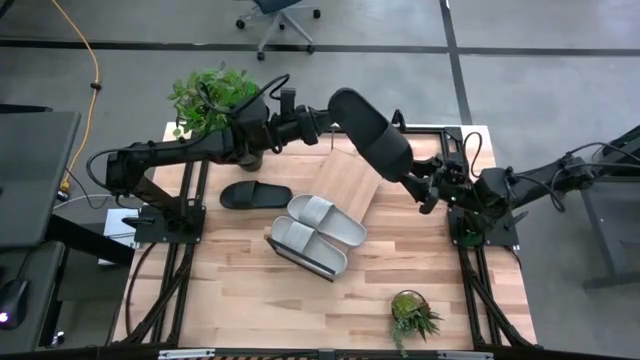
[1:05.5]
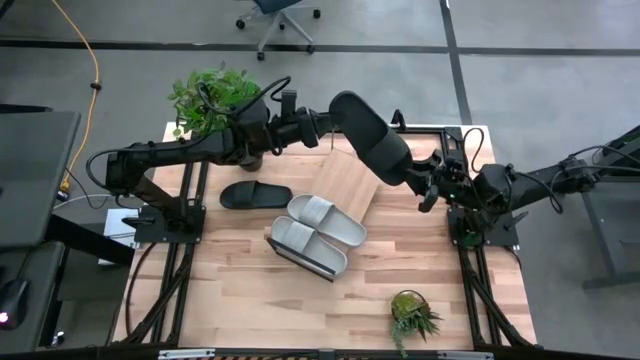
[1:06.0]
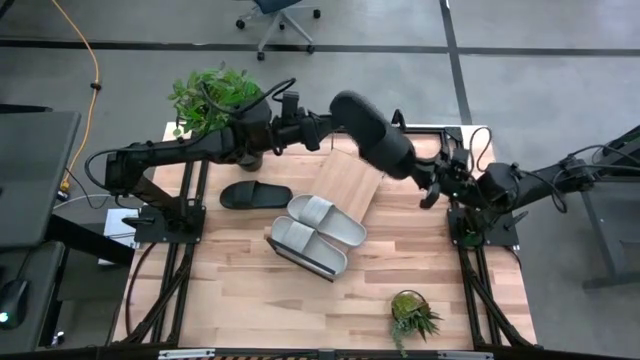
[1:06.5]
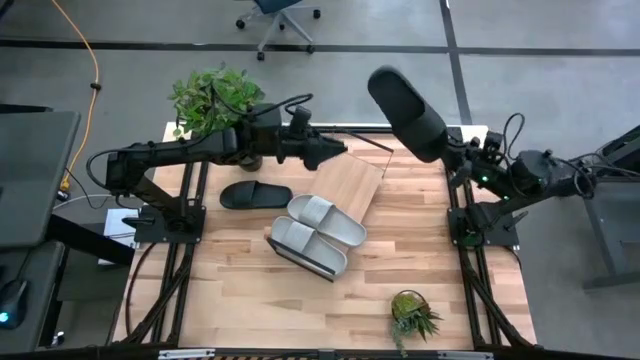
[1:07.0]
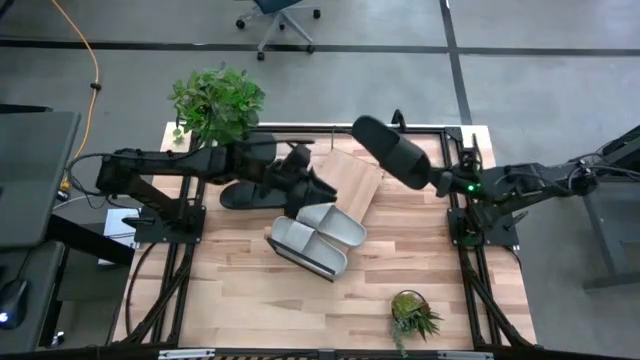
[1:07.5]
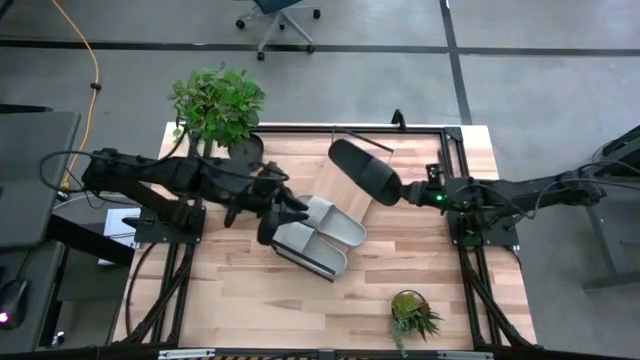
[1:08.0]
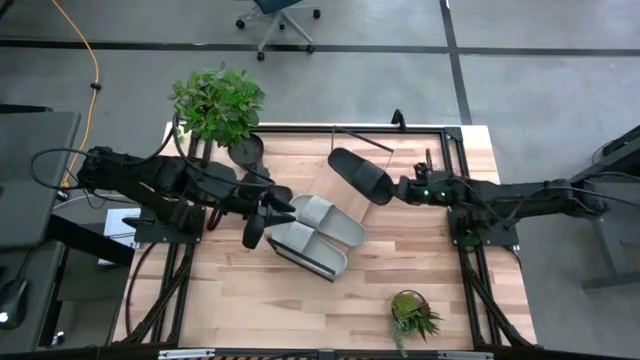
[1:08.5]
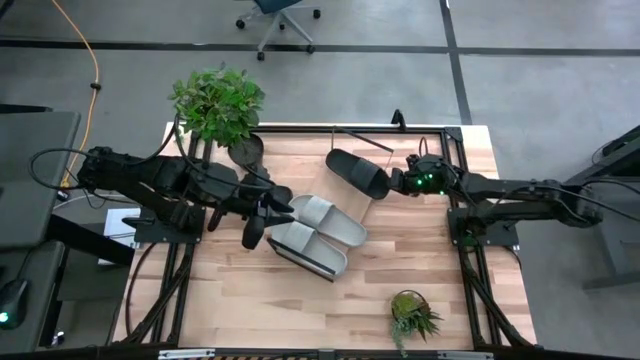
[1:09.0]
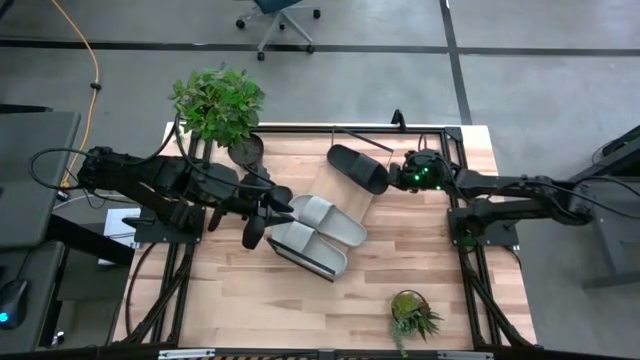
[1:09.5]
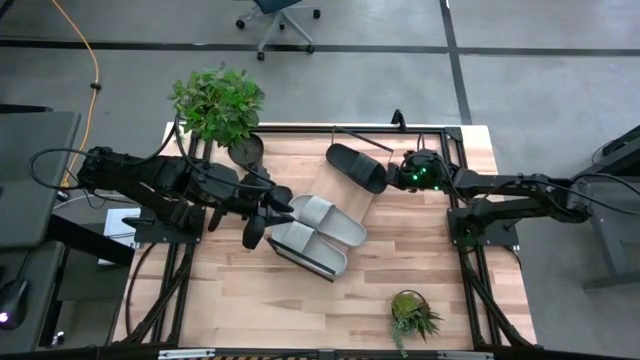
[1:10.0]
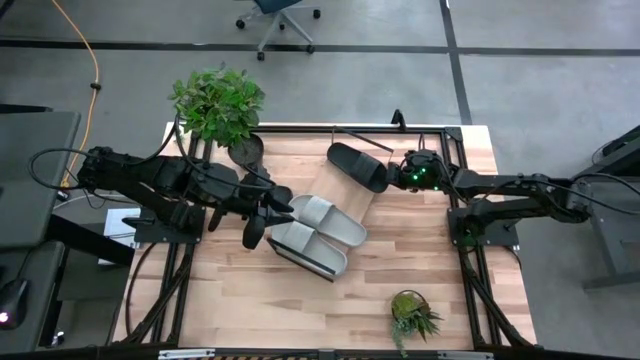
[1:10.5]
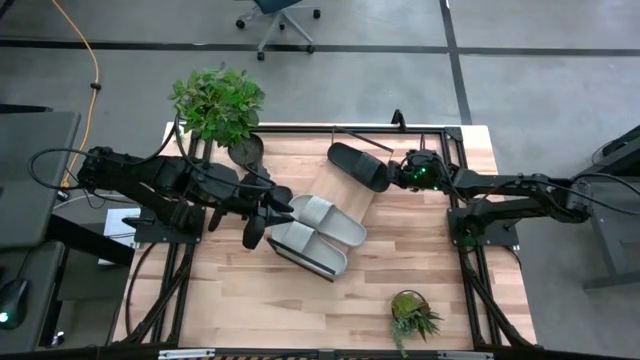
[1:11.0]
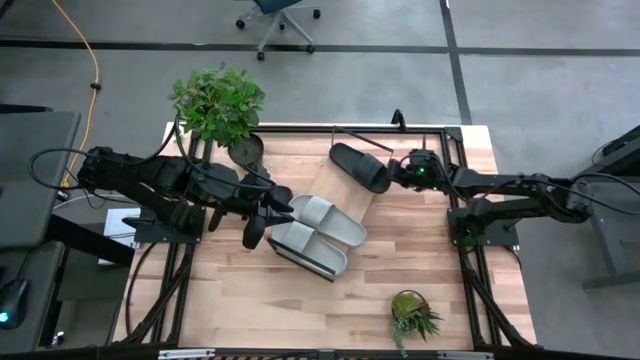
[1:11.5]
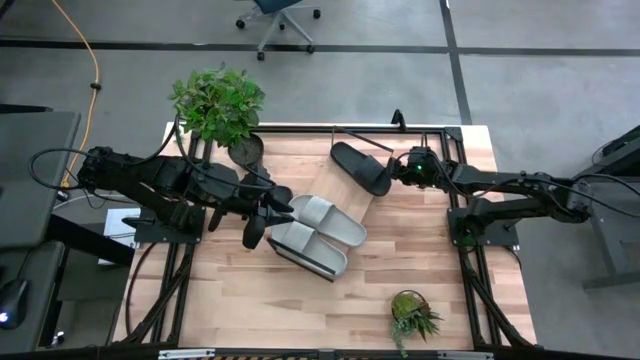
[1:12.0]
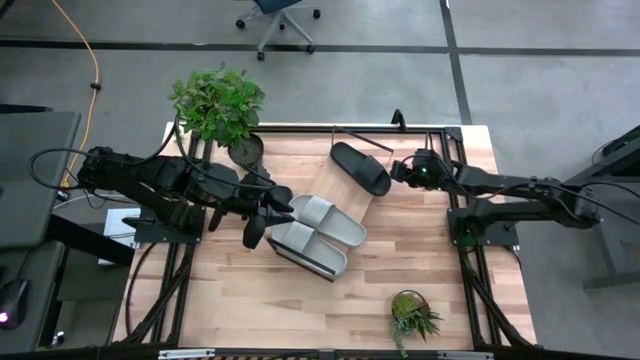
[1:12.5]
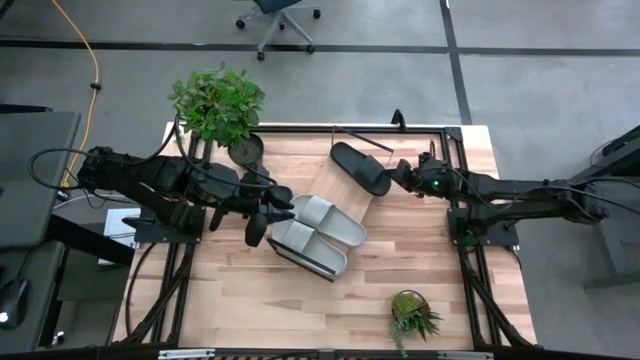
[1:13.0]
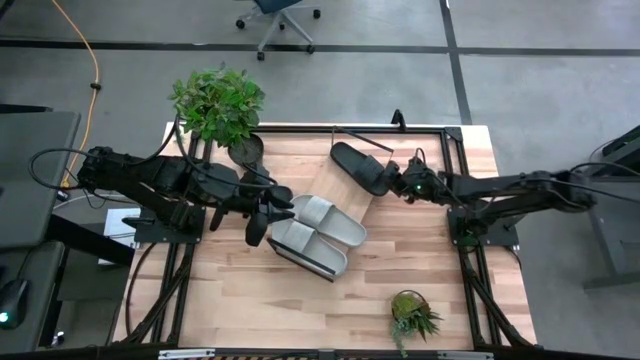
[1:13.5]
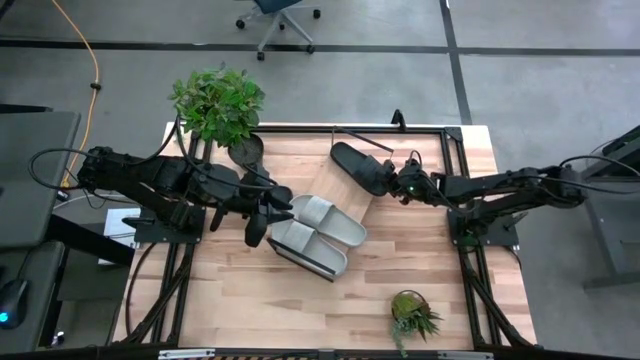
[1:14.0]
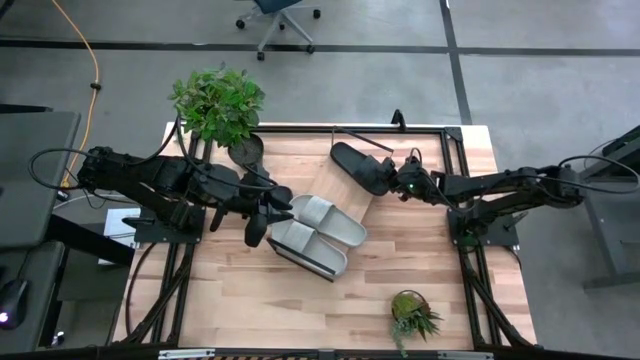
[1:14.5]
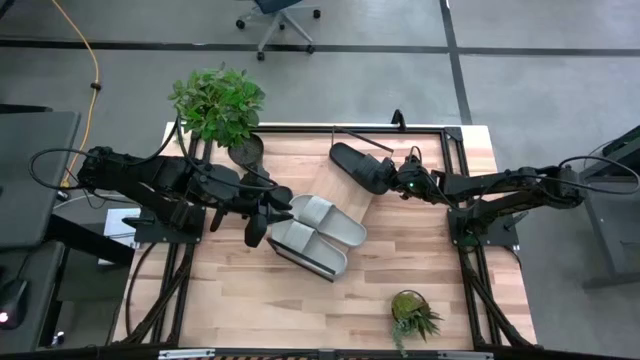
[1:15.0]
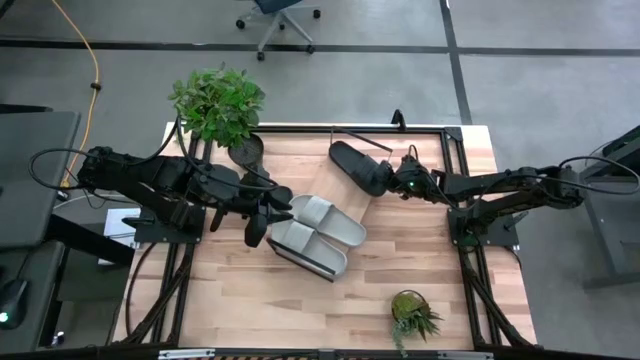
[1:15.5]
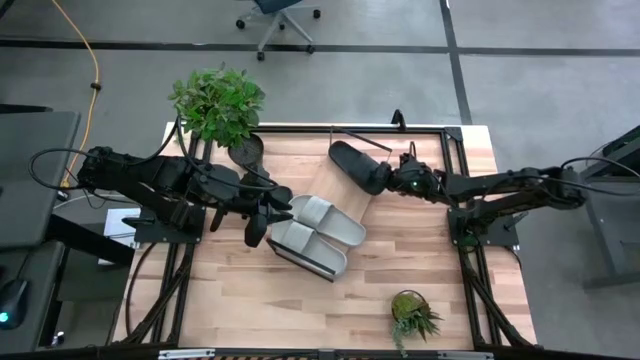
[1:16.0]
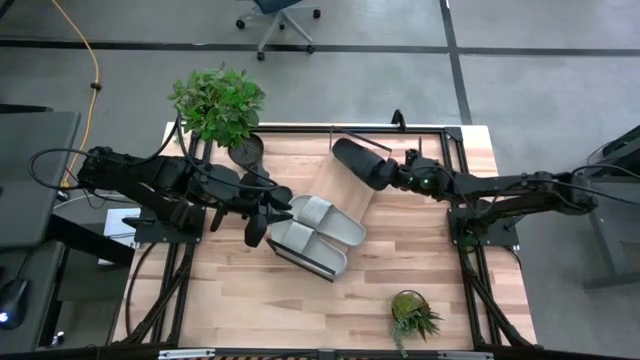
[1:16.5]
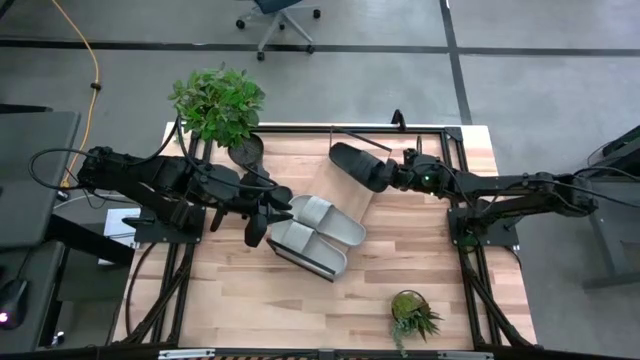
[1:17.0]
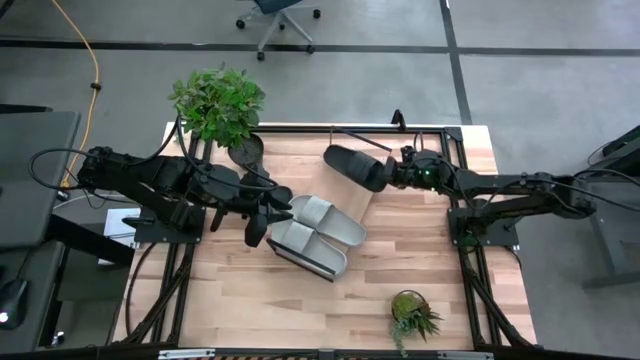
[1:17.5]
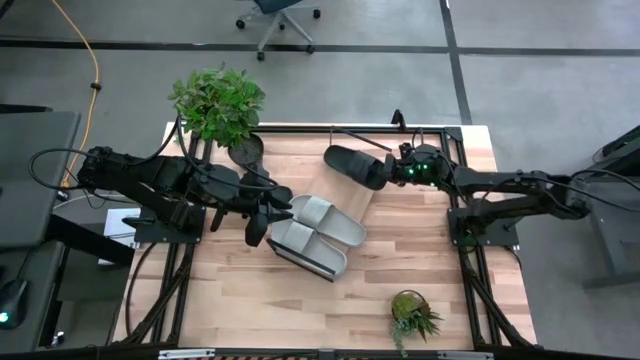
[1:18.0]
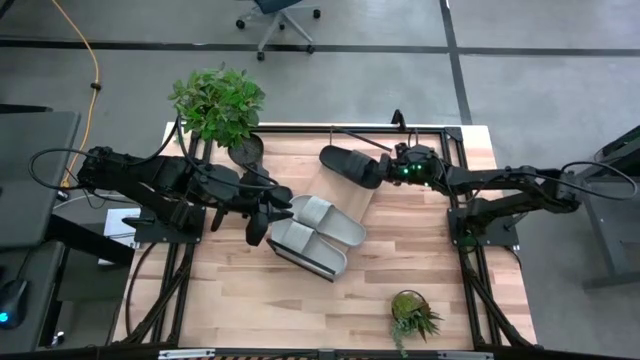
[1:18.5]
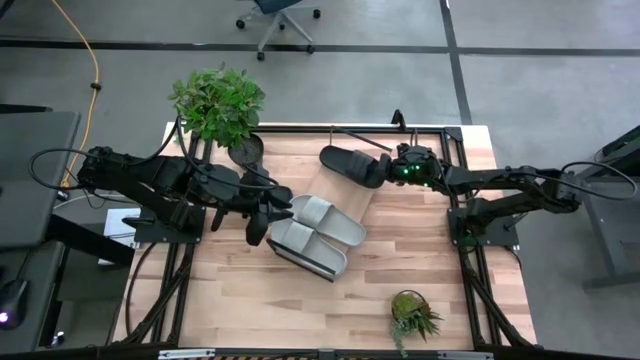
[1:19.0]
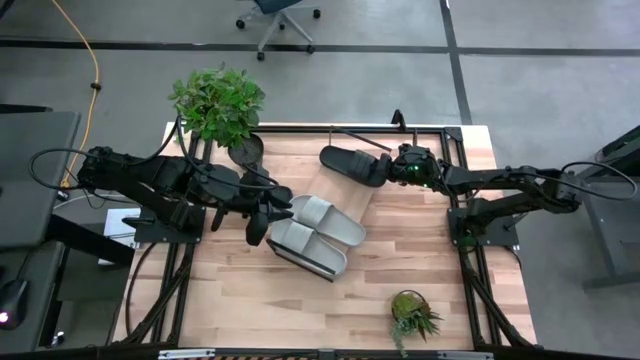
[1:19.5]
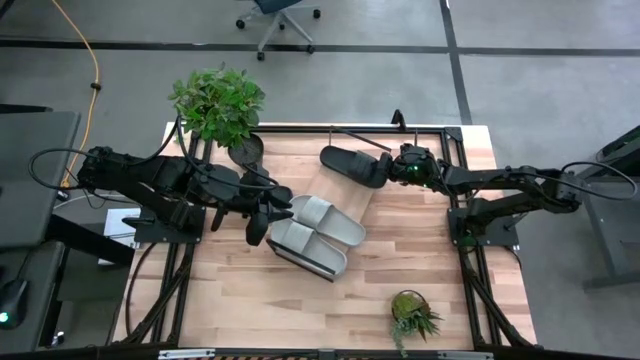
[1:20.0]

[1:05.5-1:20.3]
Task: Pick and place slides into the shelf
Put the bottom black slide on the shelf

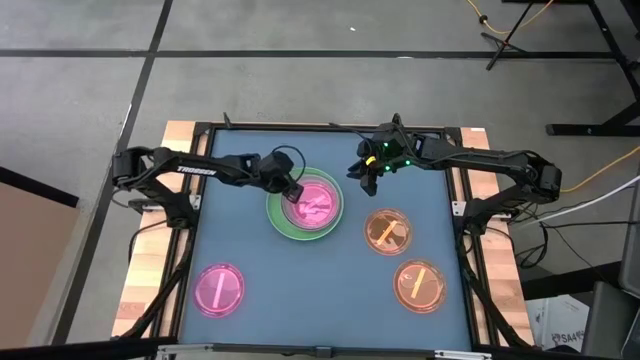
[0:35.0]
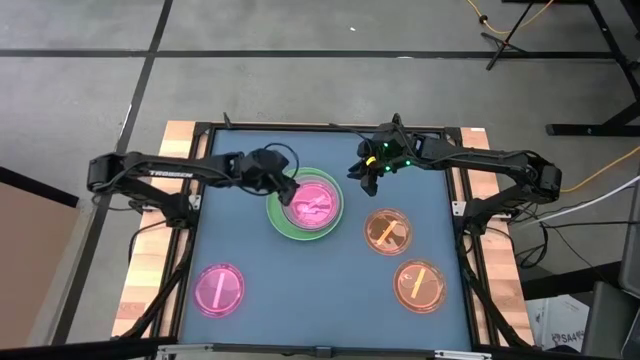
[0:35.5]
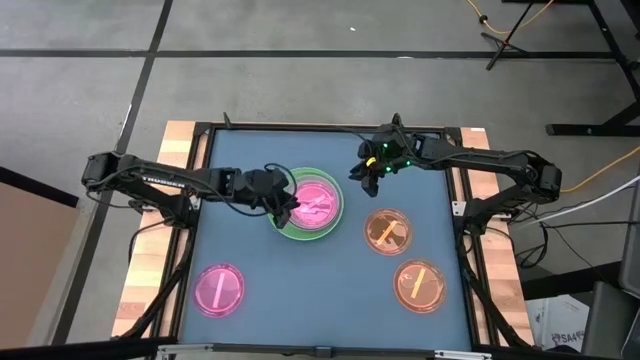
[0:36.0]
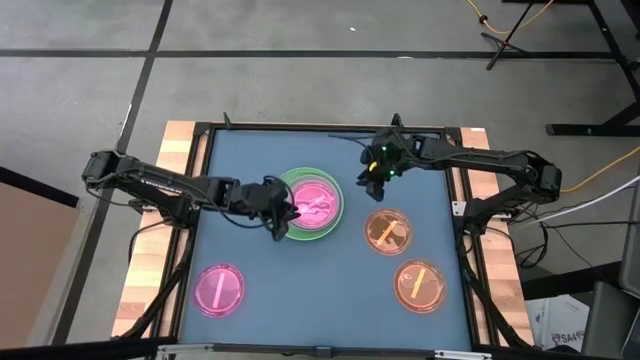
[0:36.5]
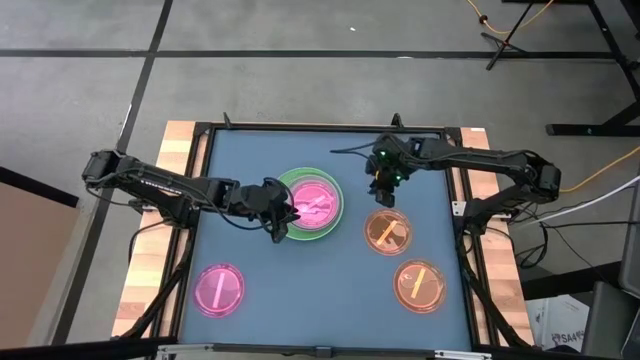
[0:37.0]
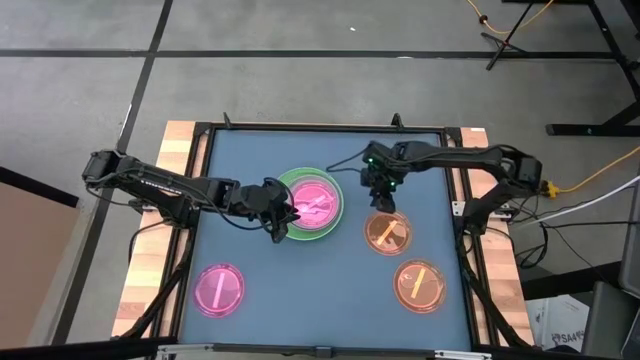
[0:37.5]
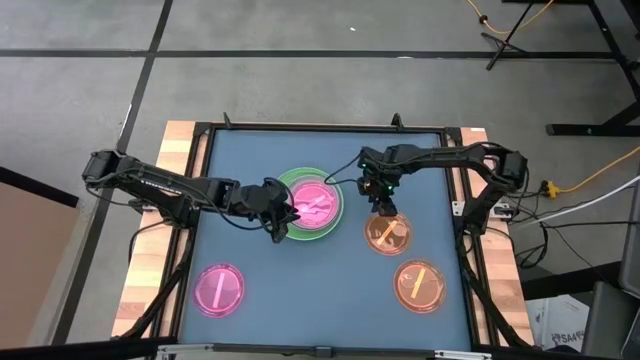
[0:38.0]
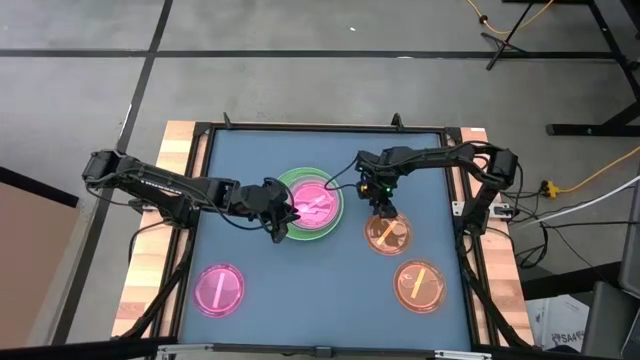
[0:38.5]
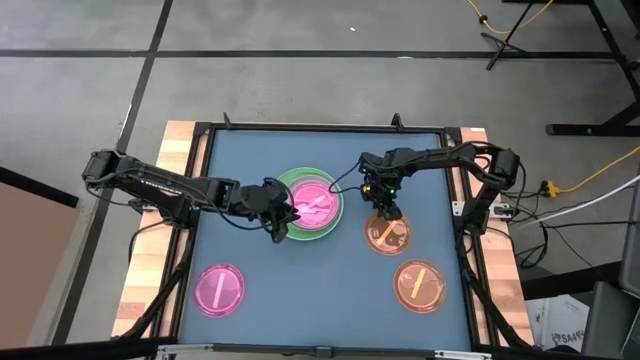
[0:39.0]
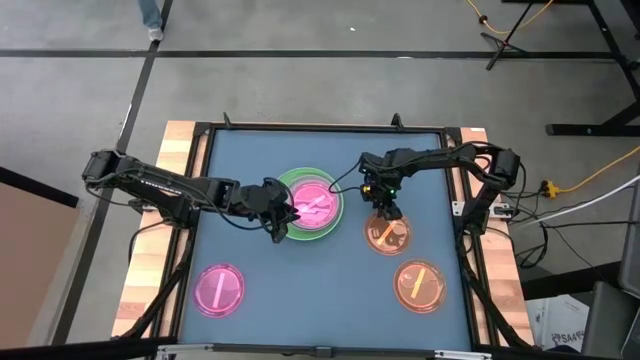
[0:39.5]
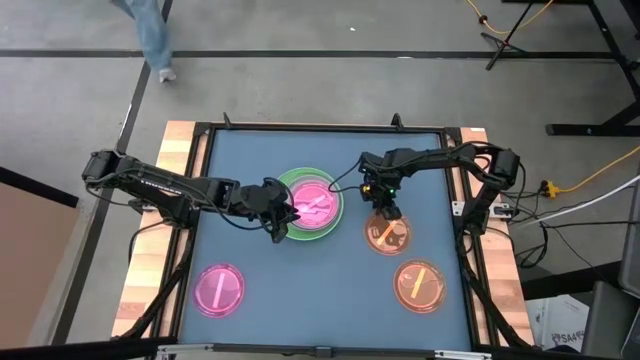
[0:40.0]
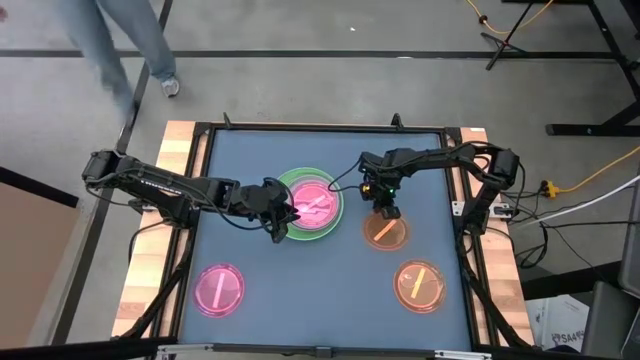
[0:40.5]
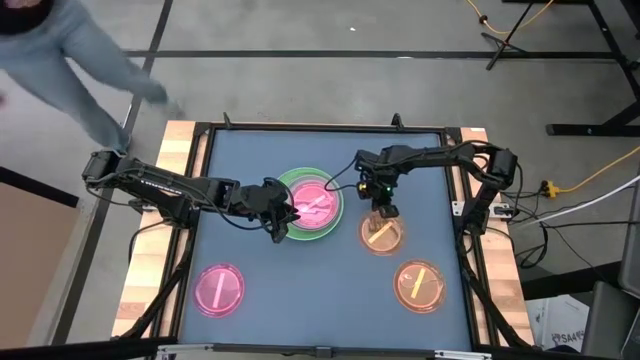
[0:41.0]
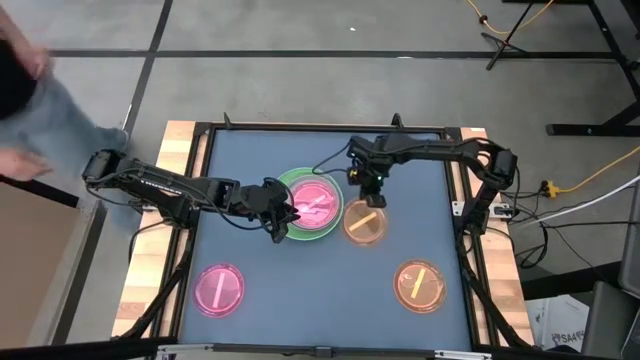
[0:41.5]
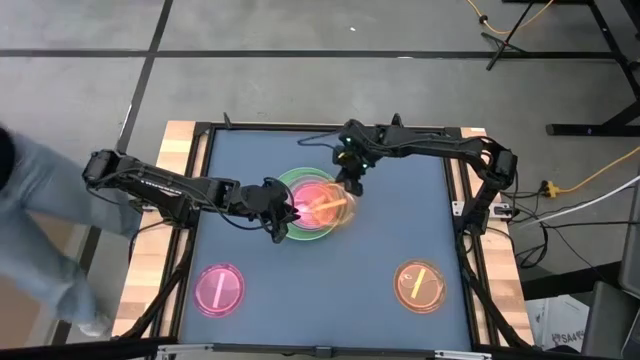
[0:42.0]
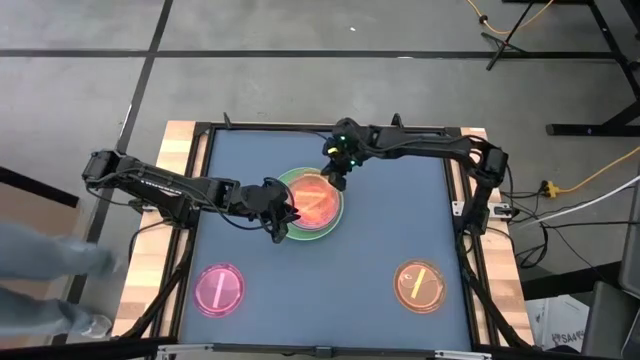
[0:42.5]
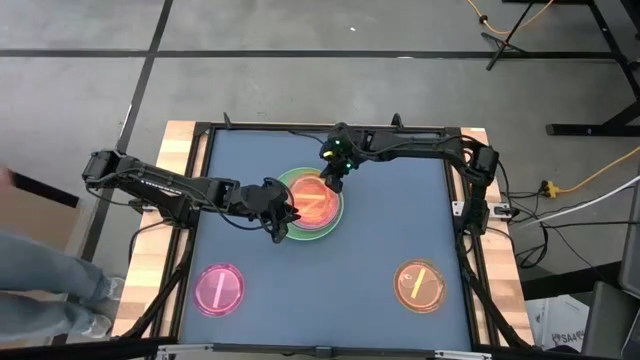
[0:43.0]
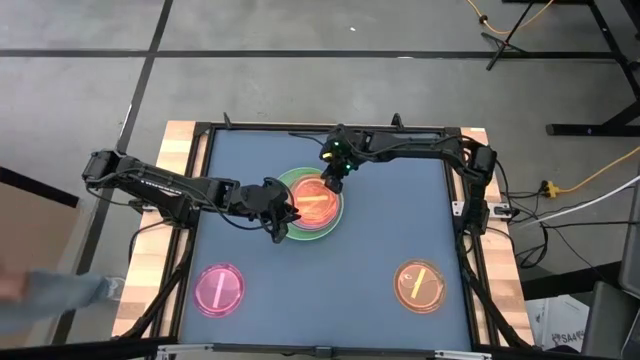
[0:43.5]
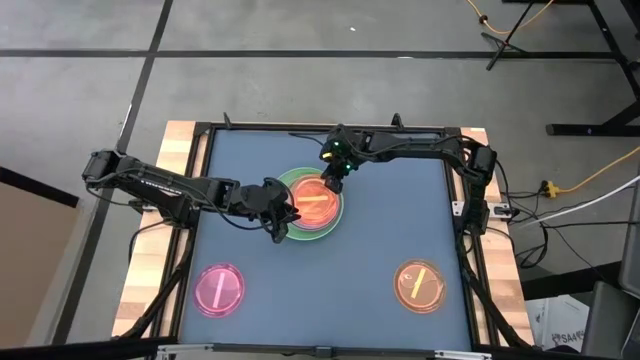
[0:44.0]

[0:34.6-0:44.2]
Task: Stack plastic plates
Stack the top transparent orange plate on the top transparent pink plate
